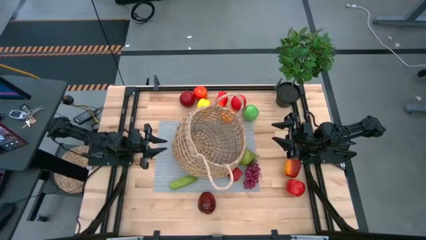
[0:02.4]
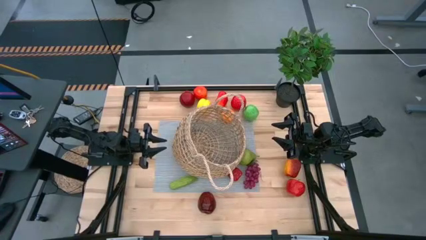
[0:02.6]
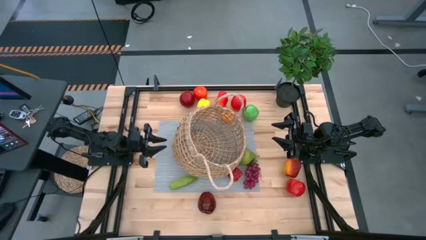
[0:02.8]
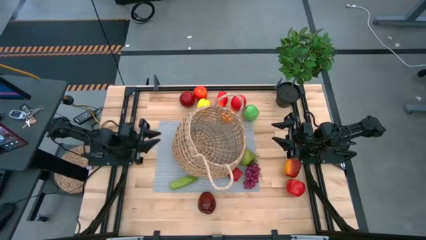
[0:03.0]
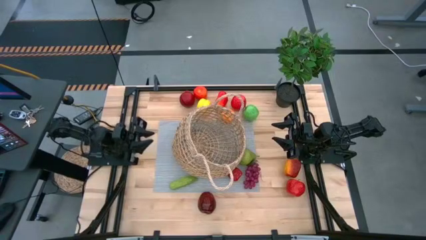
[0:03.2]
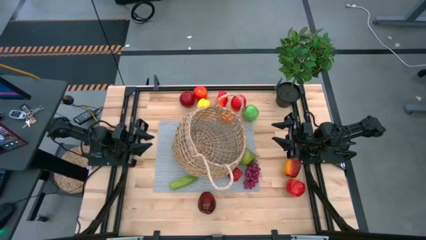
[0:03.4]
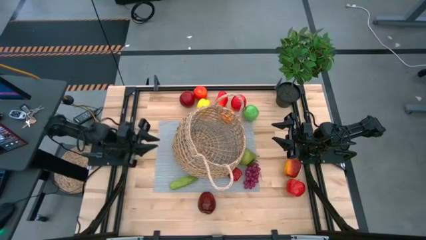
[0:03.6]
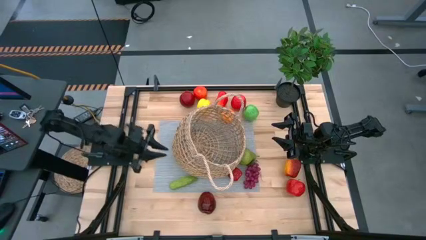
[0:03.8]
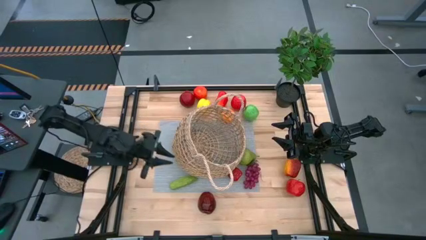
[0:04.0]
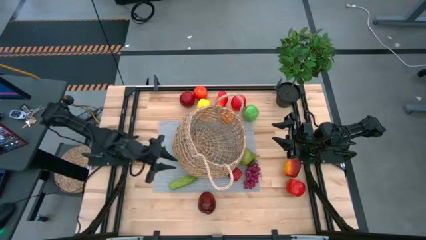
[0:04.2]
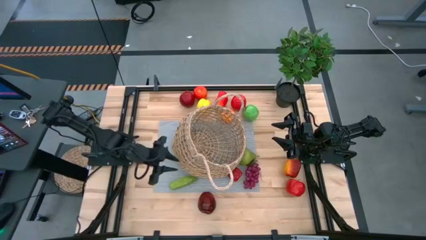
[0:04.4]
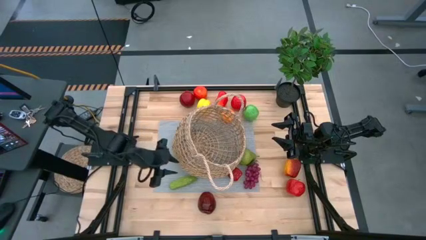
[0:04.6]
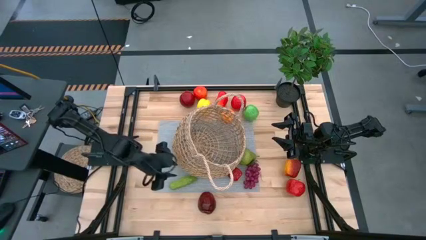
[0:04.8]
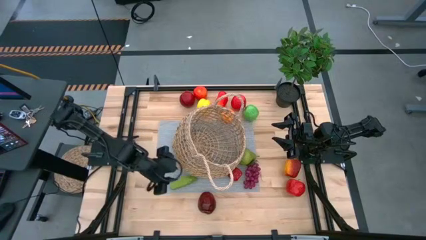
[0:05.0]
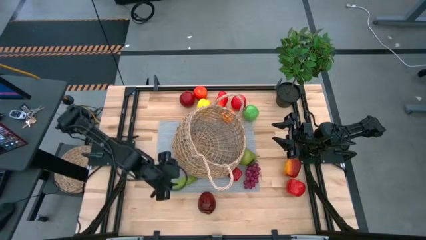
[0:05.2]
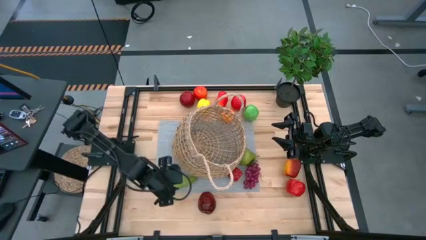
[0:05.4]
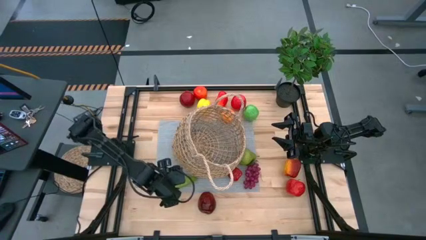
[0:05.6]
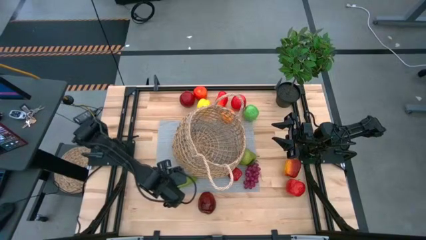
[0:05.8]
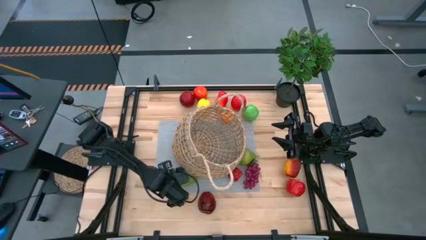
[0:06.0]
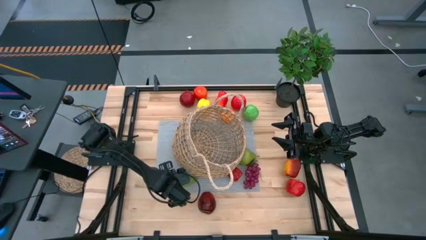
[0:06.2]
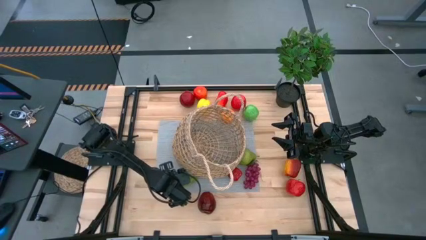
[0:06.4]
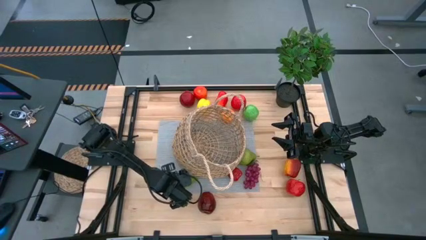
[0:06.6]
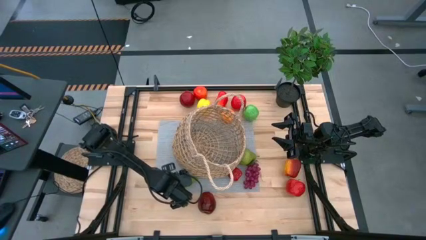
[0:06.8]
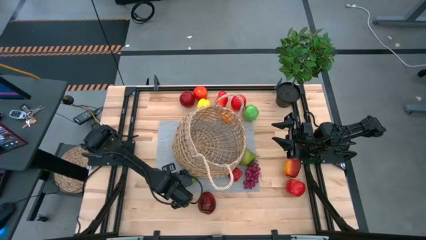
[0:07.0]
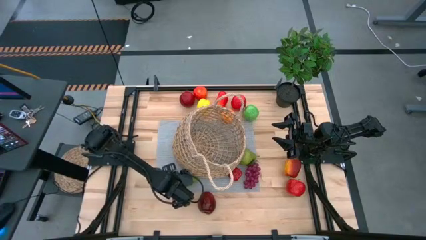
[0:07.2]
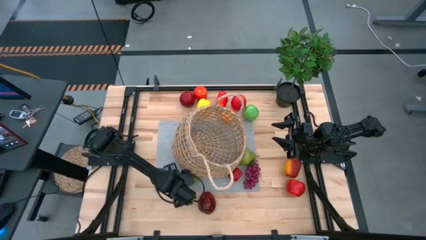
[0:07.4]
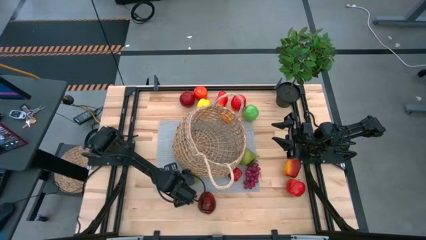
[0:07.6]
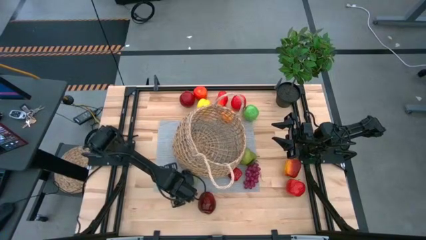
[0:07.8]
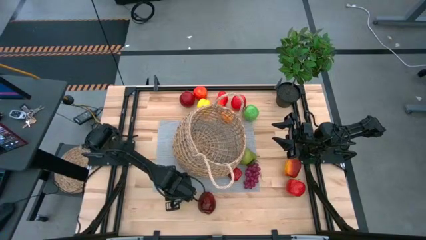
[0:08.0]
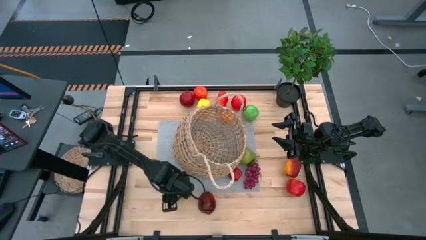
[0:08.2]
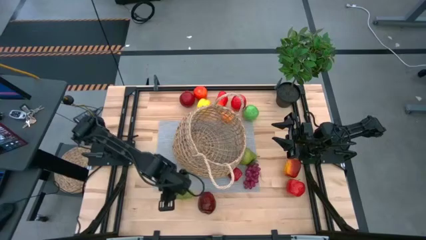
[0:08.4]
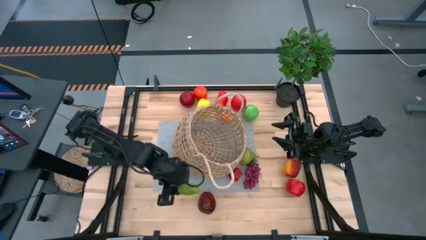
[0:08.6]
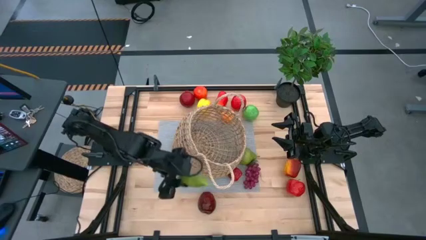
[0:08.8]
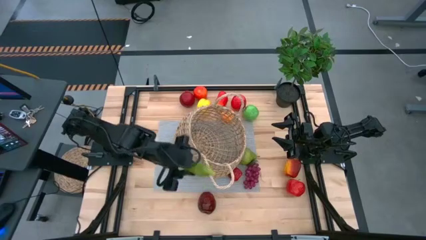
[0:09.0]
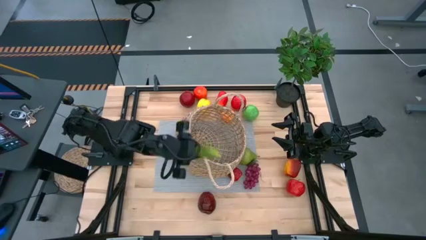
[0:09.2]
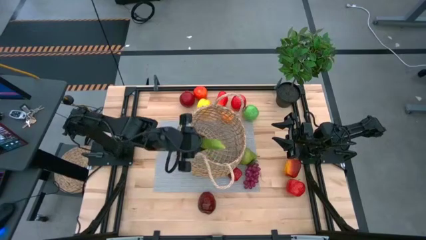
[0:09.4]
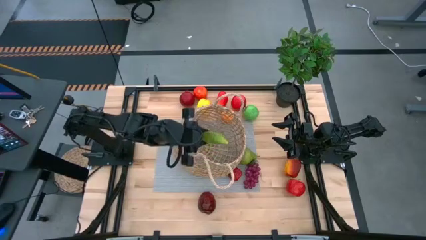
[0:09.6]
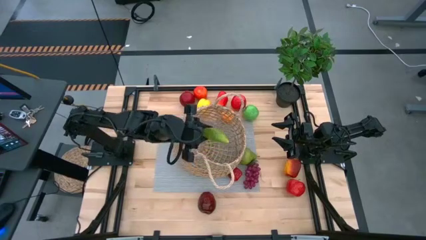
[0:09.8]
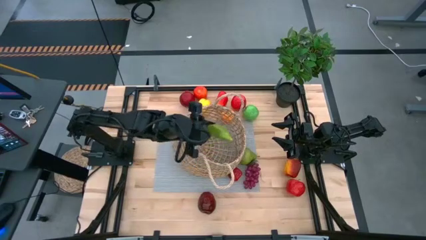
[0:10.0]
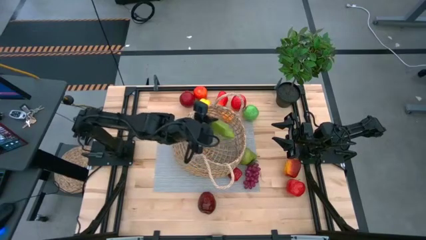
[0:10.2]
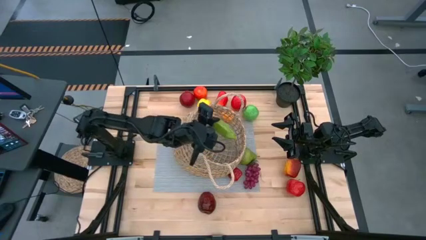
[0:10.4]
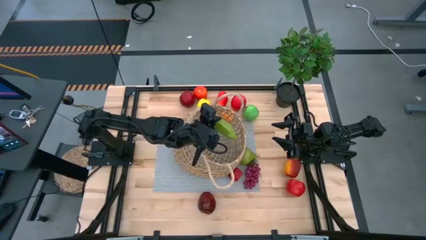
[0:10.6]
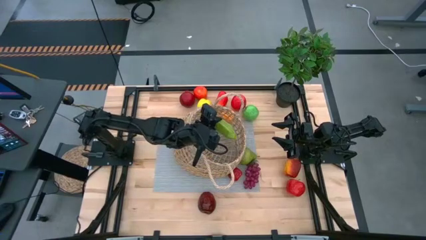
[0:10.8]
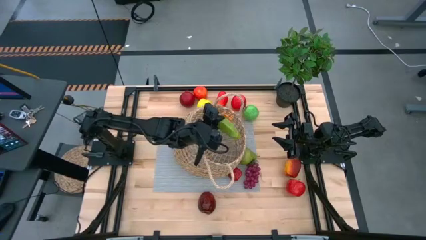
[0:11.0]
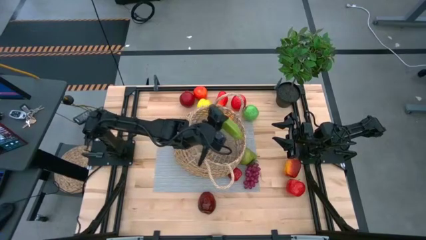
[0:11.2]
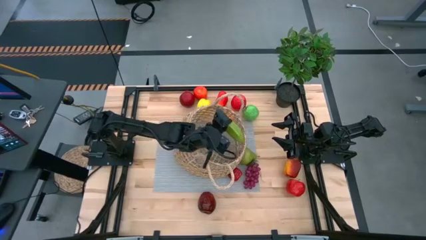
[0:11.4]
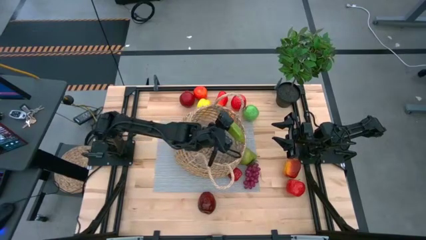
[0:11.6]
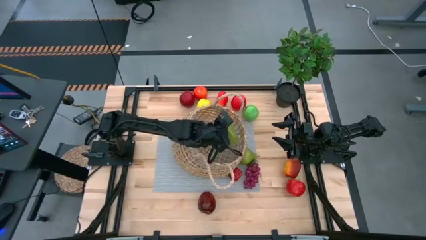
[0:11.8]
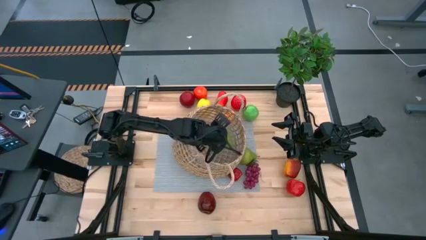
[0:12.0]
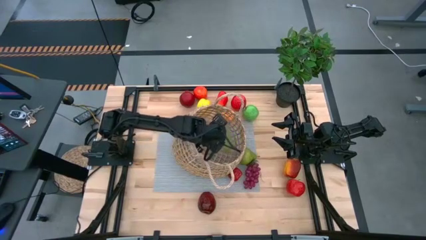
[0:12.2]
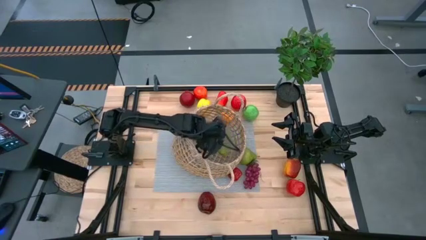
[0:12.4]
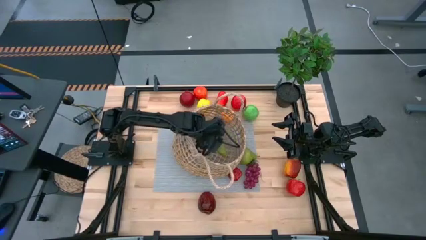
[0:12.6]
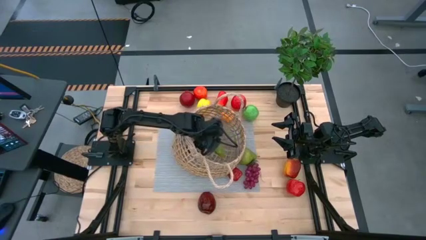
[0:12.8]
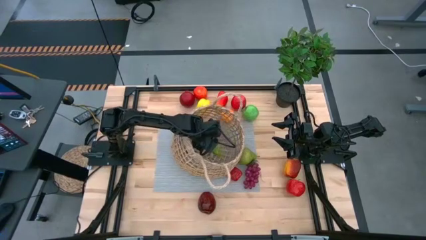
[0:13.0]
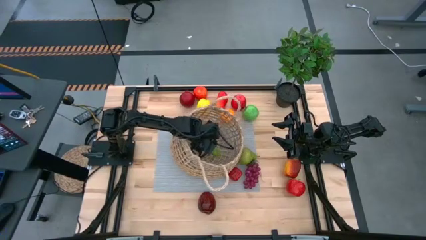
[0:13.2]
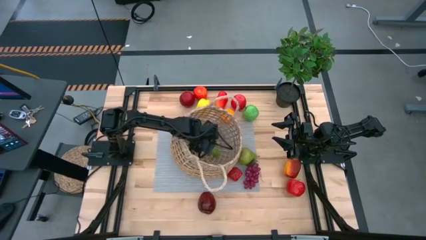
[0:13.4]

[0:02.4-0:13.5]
Task: Build produce basket
Put the cucumber into the mesh basket

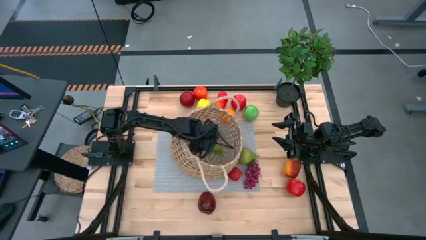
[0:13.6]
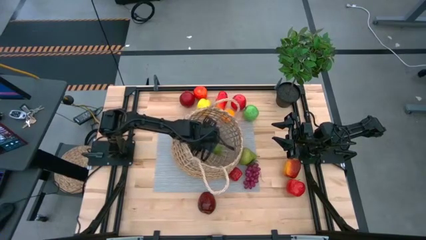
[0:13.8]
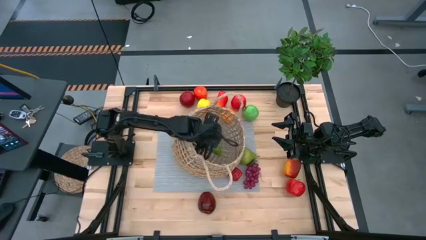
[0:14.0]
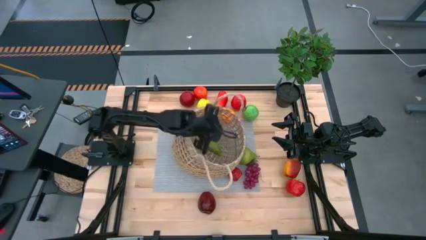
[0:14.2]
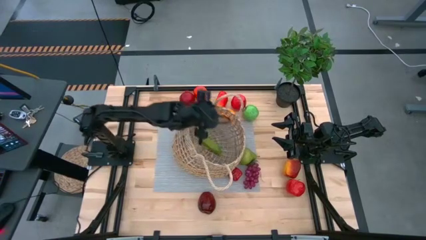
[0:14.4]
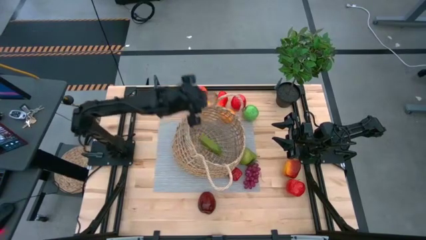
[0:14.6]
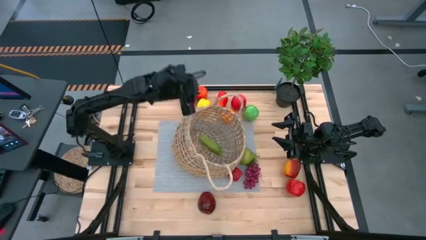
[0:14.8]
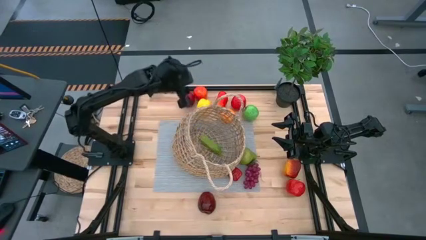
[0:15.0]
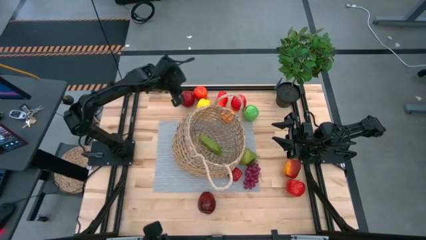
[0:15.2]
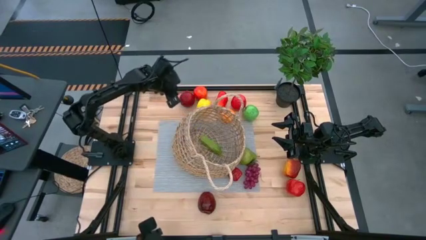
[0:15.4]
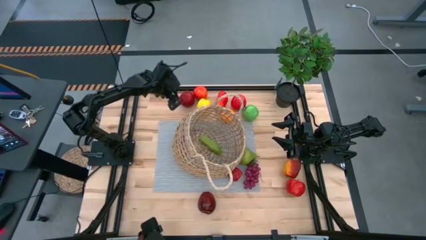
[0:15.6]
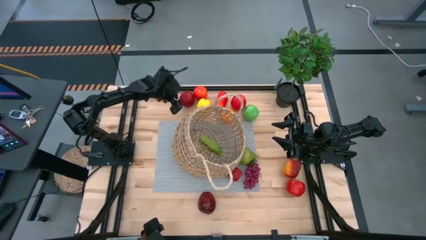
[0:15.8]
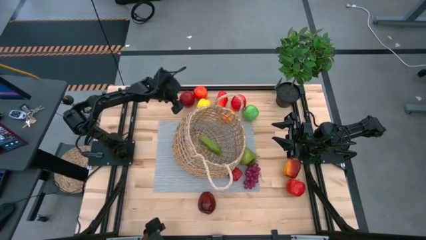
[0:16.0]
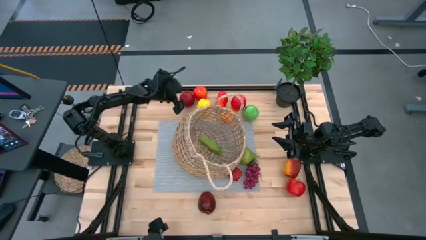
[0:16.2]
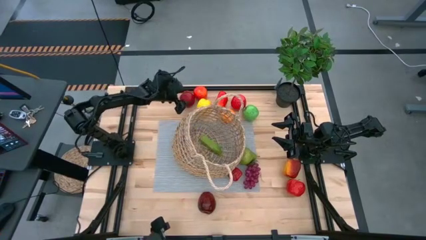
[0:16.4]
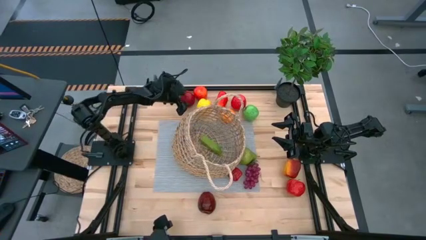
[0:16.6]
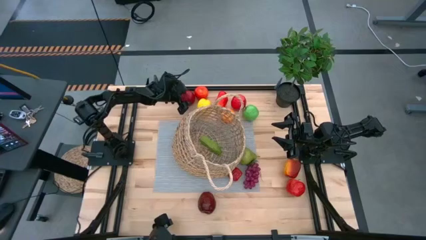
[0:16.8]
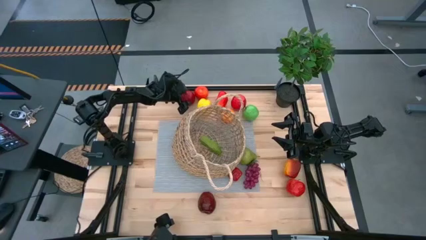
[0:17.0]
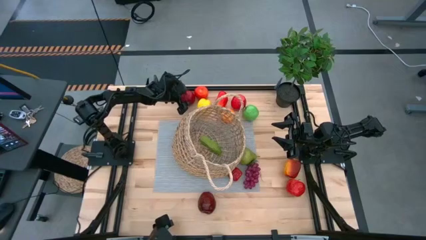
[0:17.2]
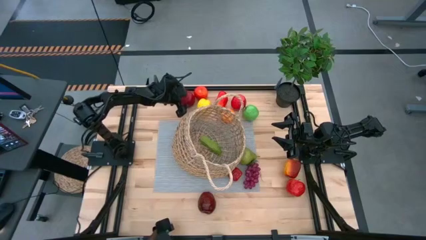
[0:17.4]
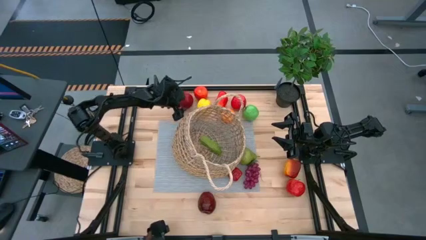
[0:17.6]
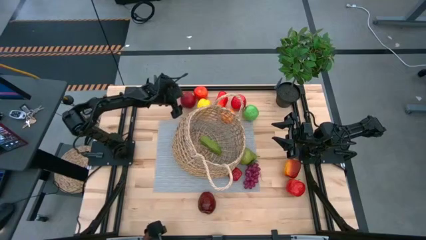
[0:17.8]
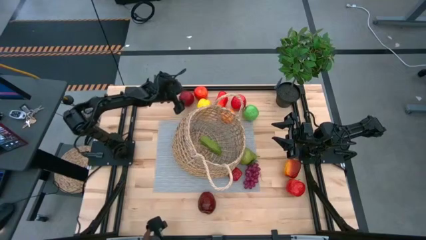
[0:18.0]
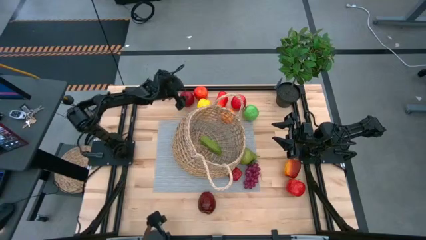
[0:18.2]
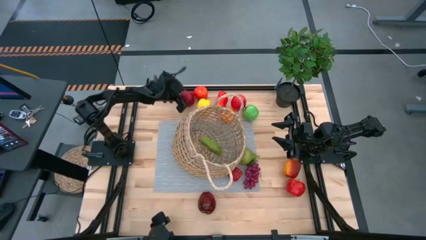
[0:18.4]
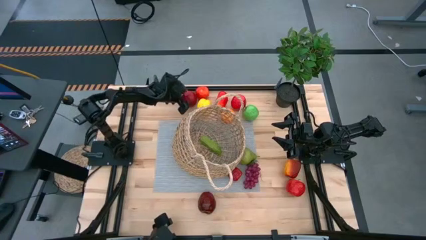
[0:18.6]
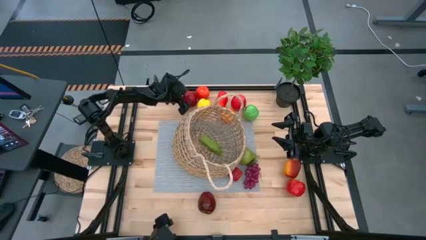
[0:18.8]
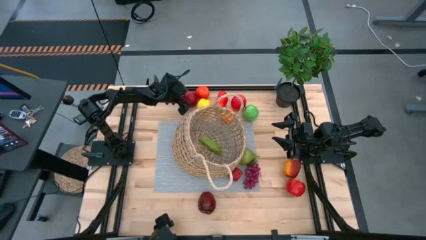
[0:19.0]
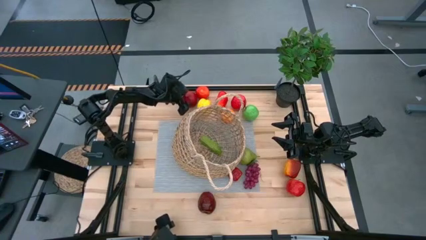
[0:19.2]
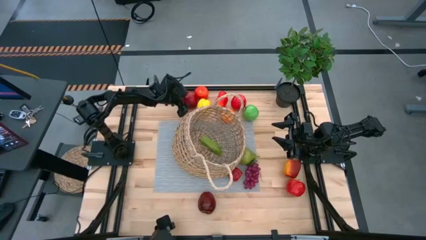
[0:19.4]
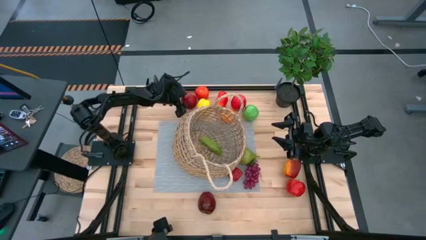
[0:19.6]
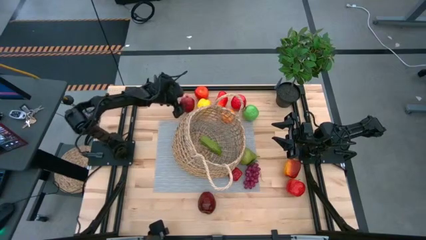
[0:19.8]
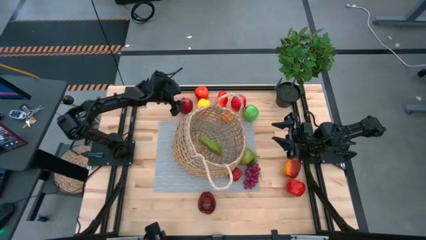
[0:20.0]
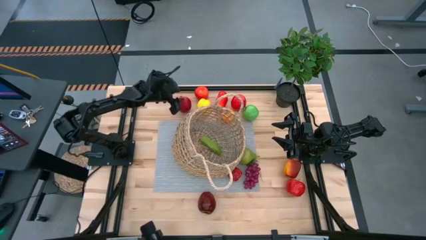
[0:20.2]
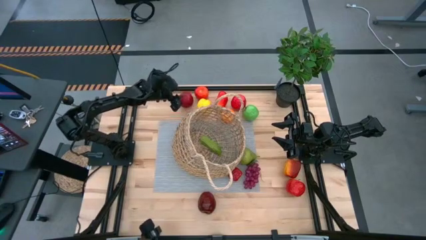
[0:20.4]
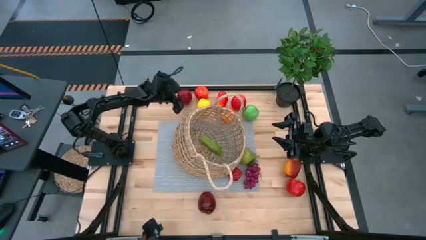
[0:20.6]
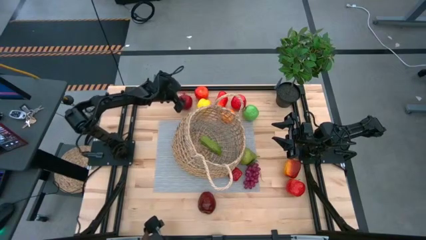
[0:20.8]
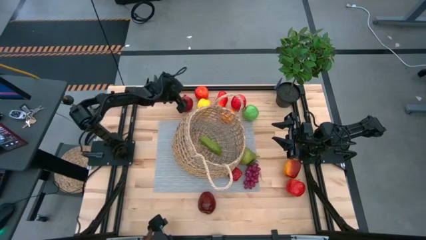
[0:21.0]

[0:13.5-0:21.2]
Put the pomegranate into the mesh basket
